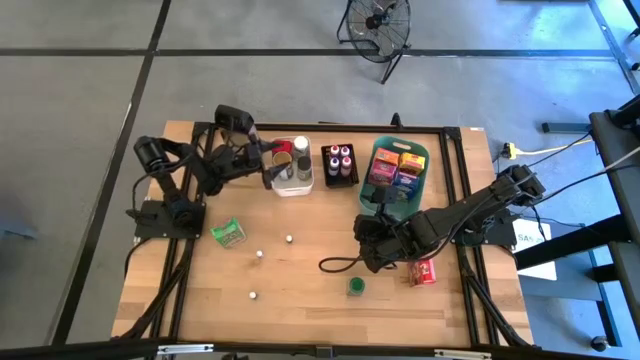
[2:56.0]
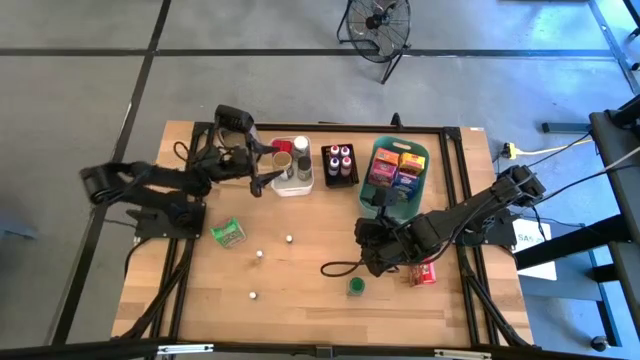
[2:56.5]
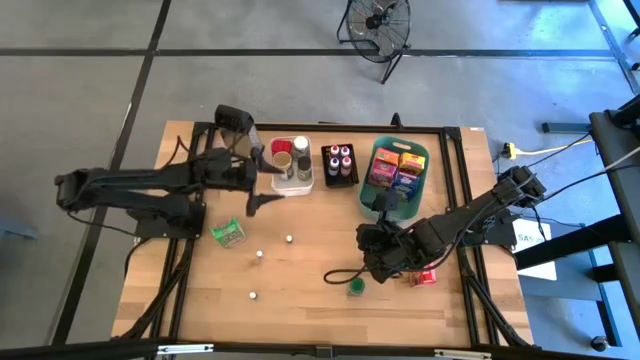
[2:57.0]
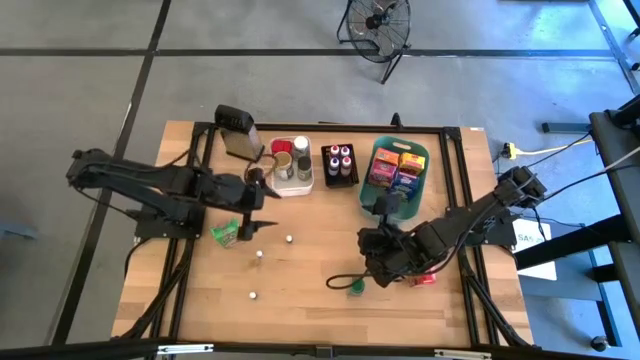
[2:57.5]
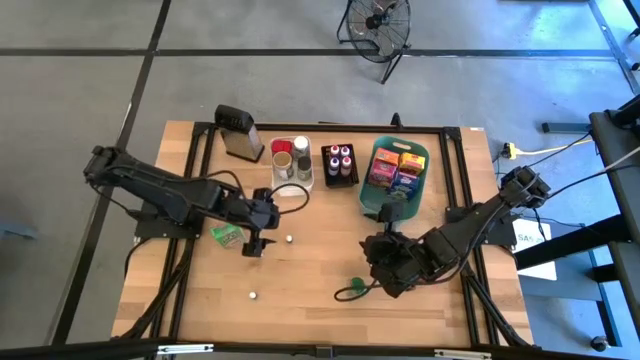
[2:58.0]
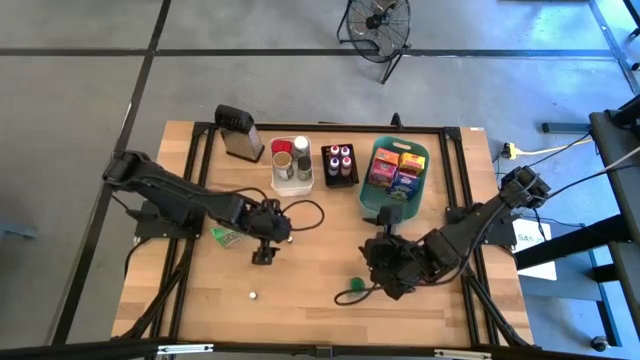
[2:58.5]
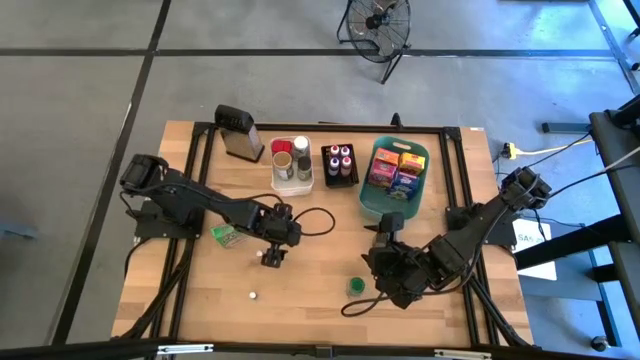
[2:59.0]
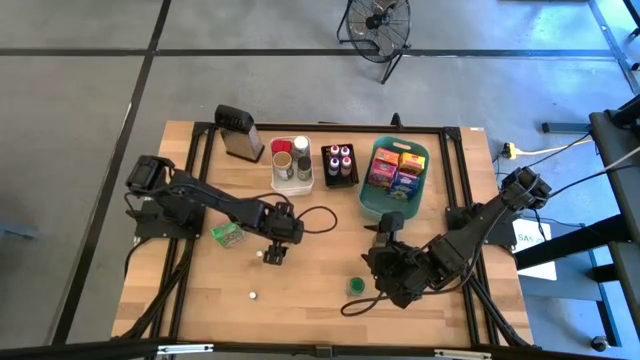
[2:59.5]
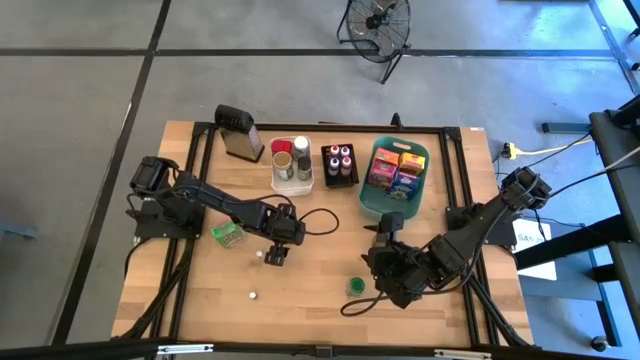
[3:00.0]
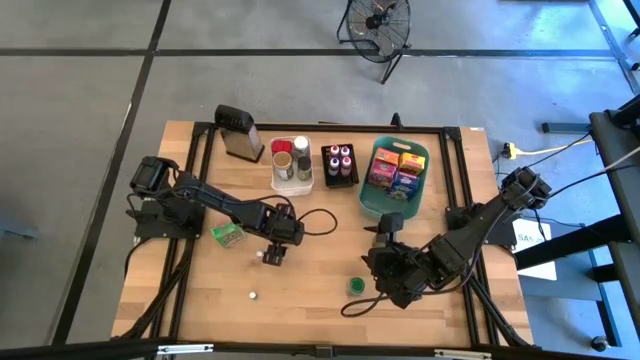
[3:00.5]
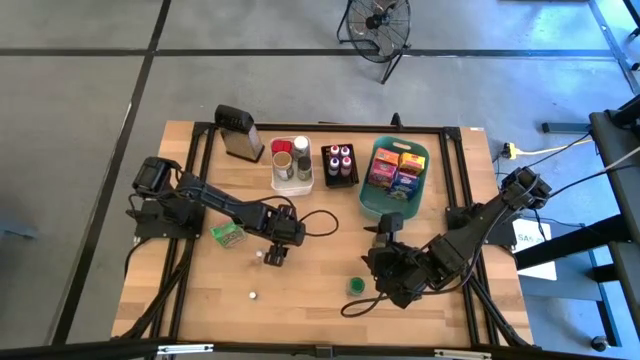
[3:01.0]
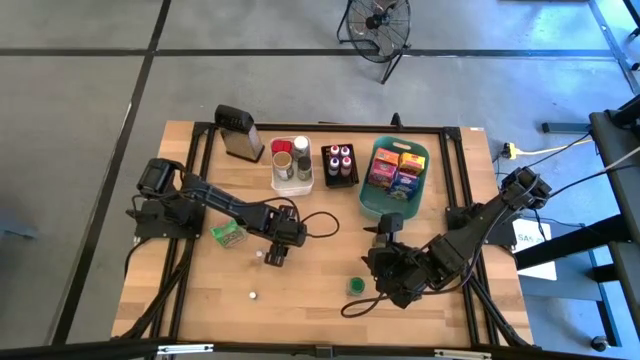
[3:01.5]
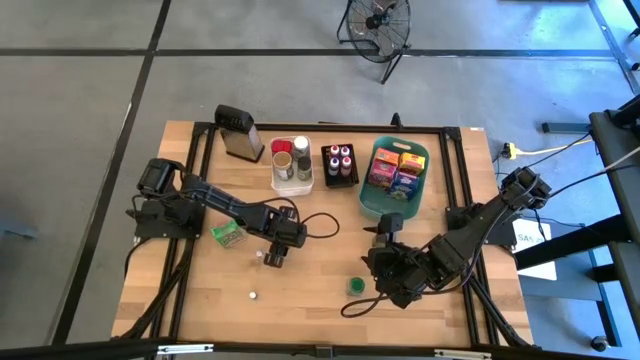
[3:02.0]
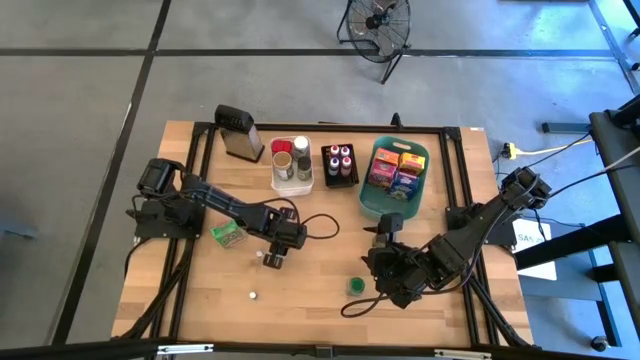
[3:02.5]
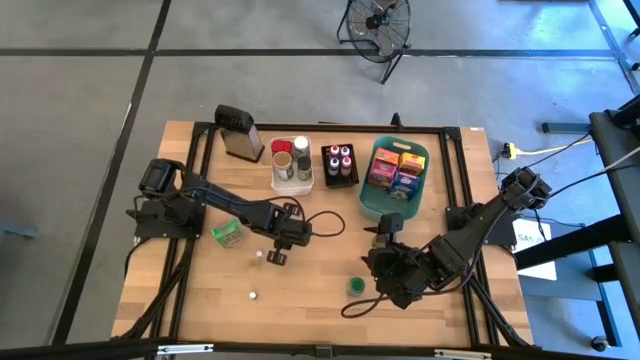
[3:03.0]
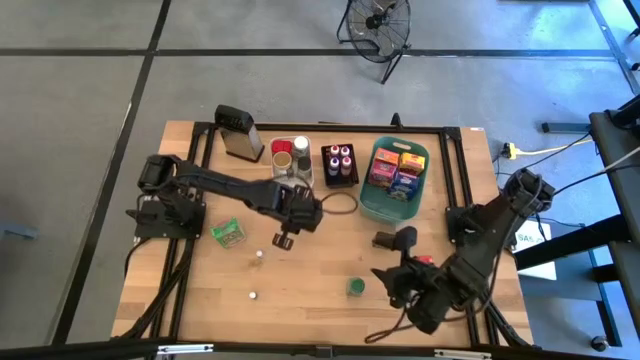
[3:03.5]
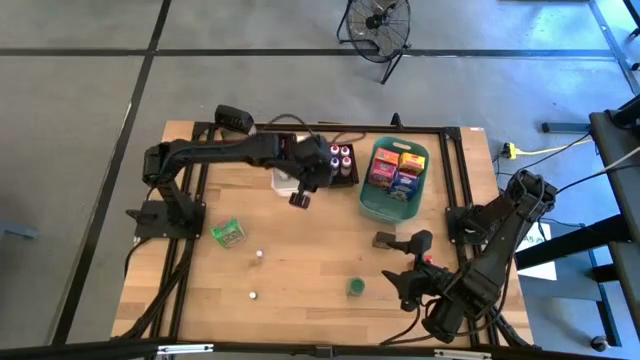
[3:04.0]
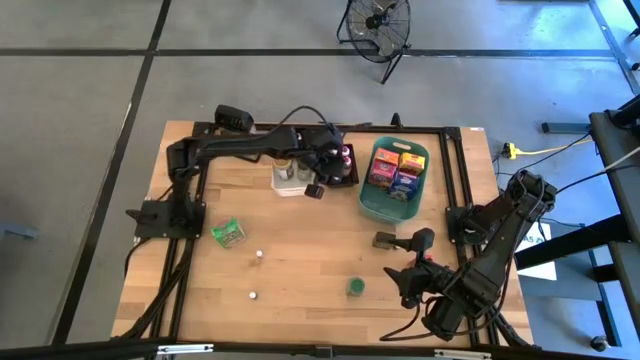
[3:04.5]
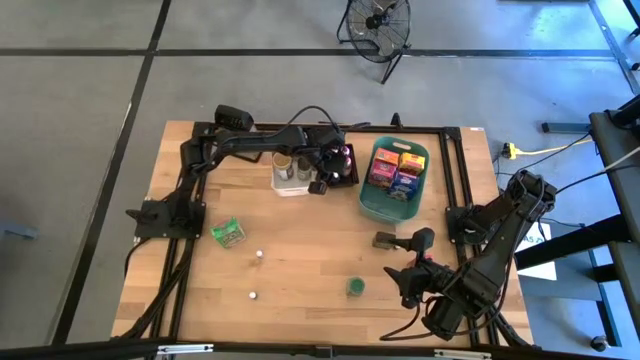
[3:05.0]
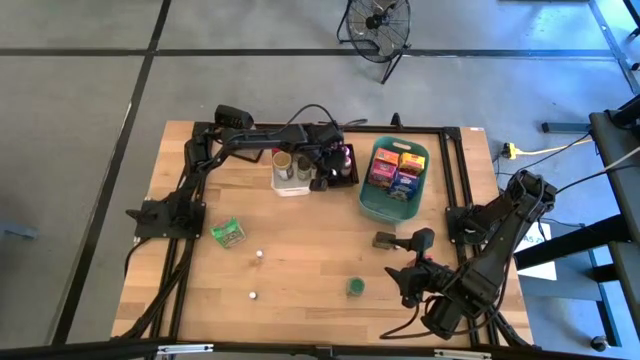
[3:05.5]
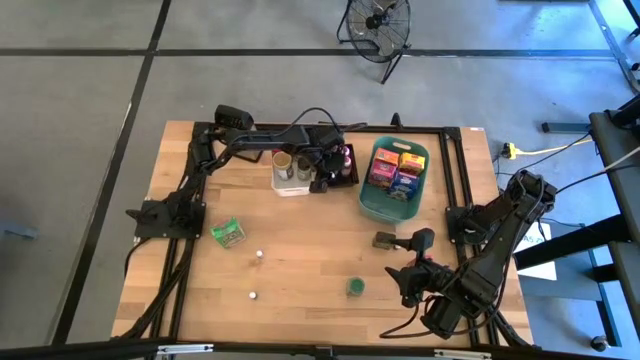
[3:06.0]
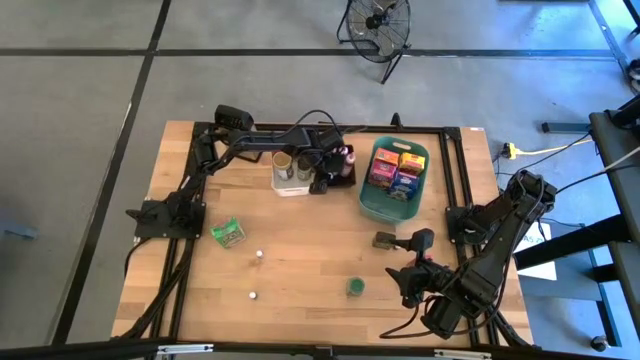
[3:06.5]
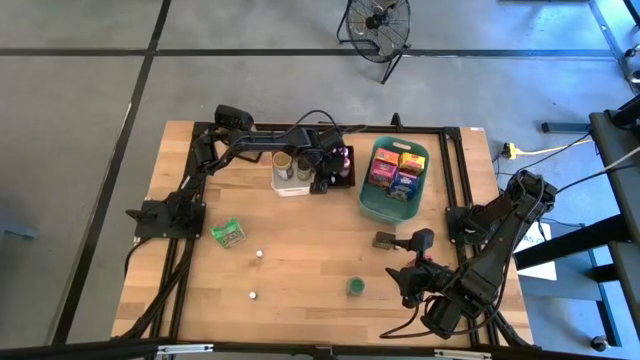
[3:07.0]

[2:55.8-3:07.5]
Task: Pick & Place Kitchen Items
Put the small green food coloring bottle into the black bin

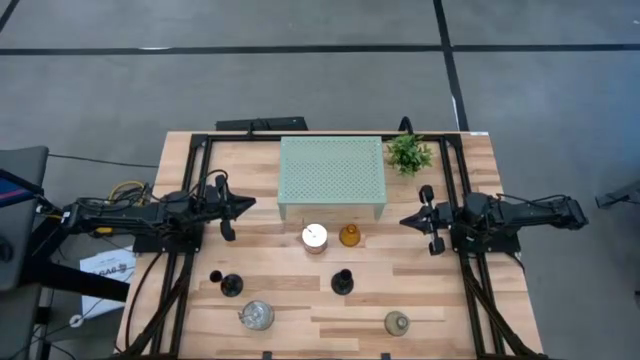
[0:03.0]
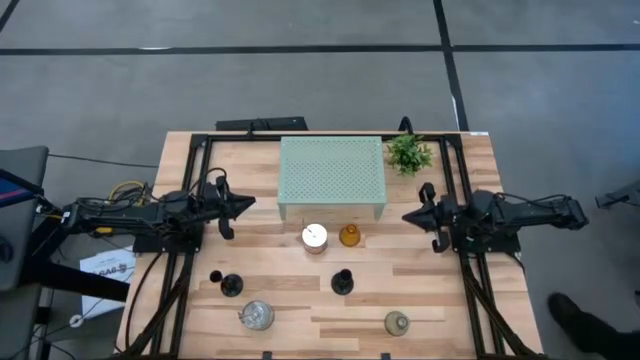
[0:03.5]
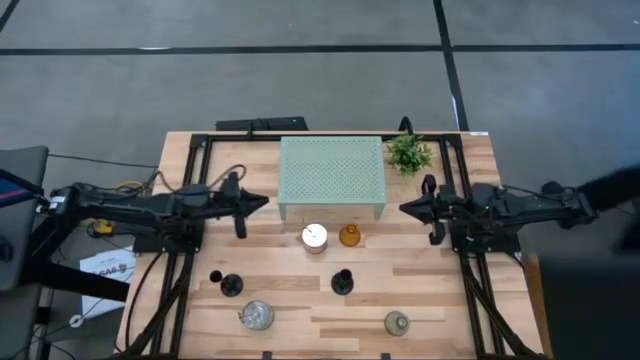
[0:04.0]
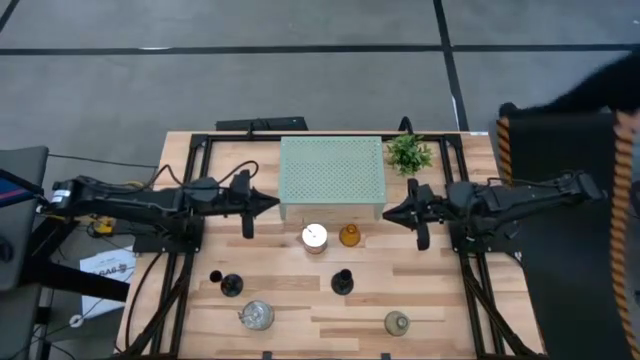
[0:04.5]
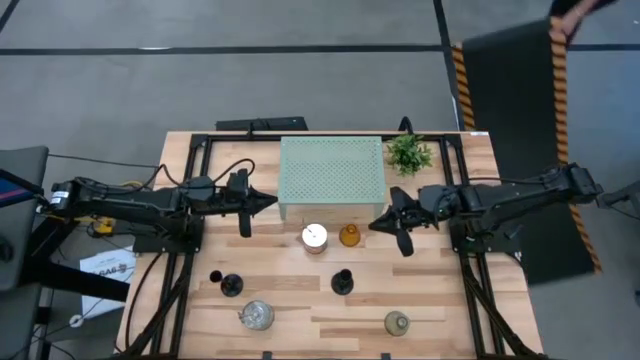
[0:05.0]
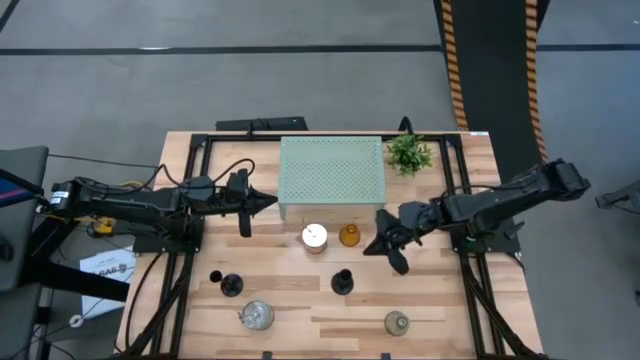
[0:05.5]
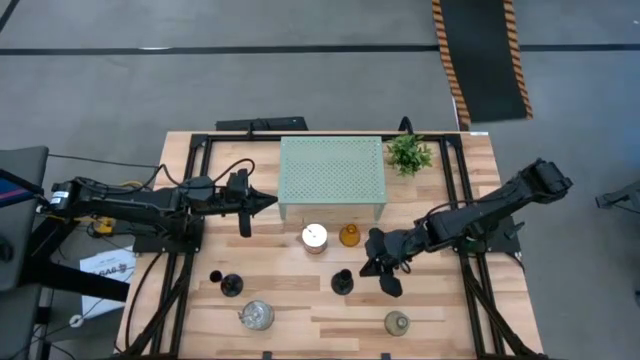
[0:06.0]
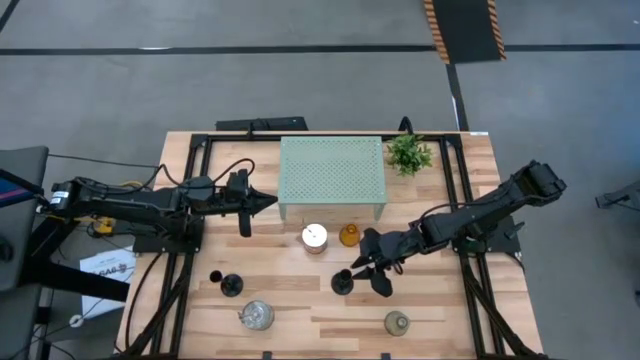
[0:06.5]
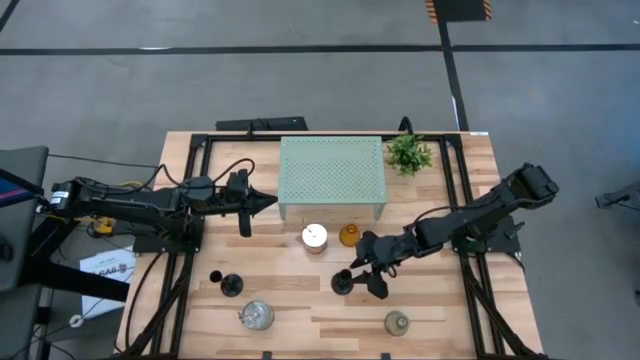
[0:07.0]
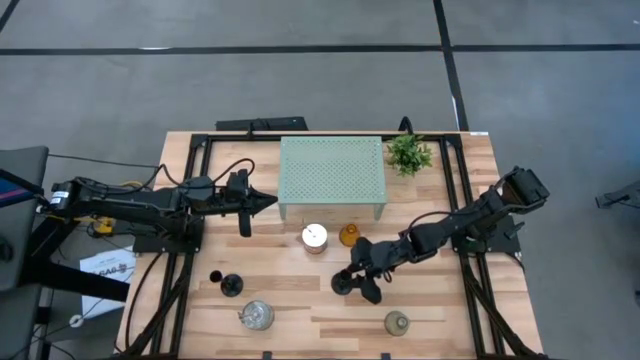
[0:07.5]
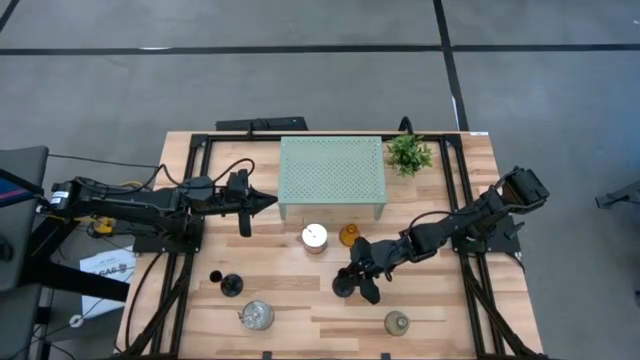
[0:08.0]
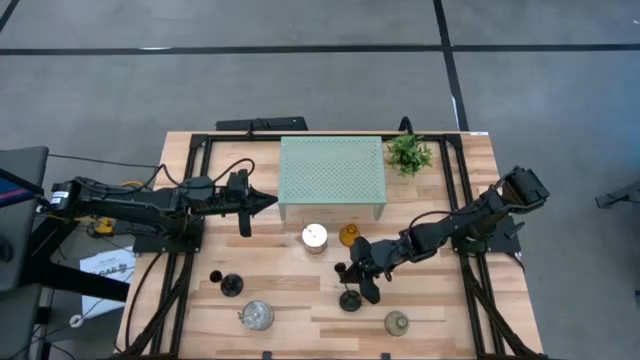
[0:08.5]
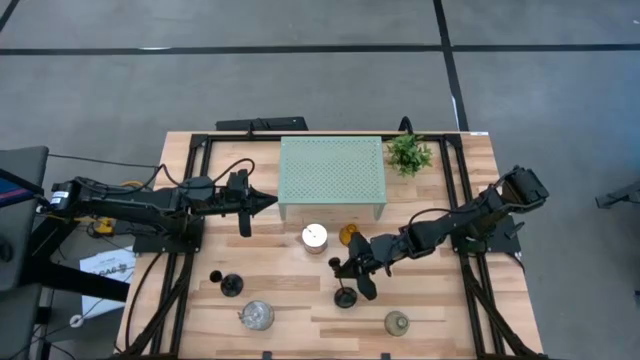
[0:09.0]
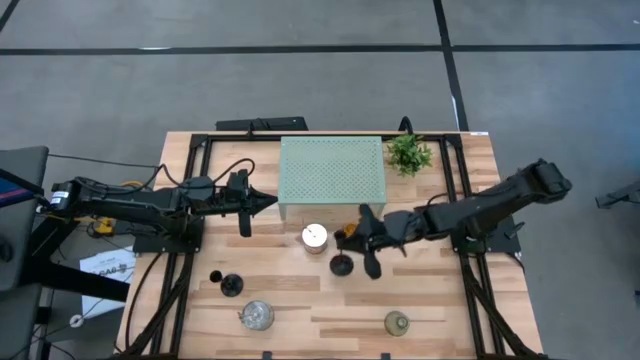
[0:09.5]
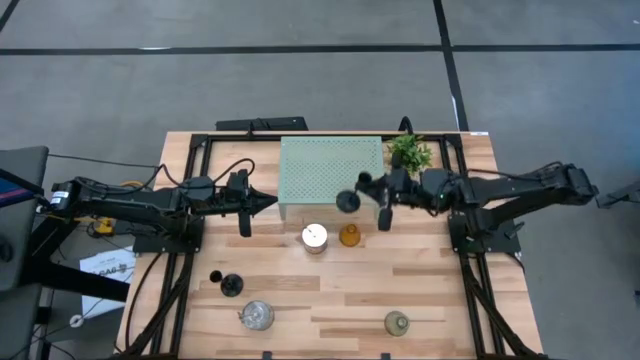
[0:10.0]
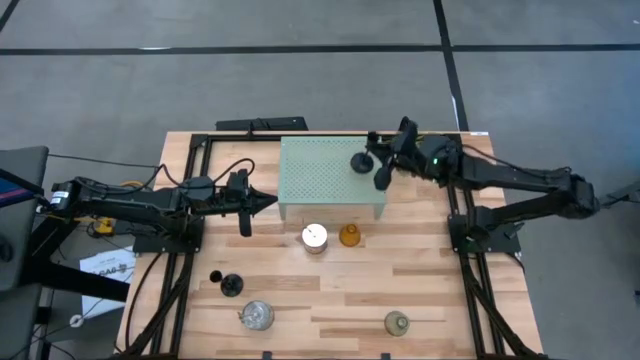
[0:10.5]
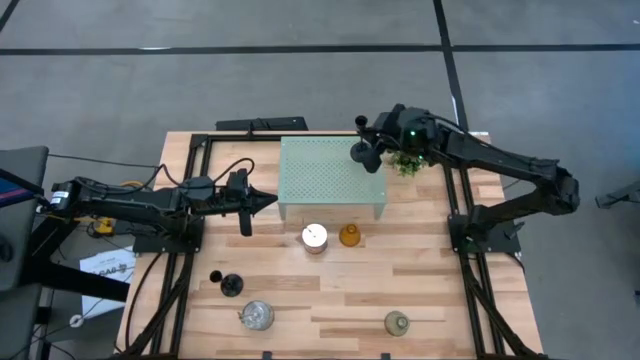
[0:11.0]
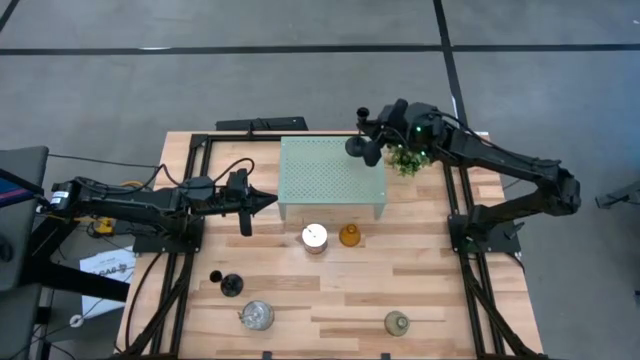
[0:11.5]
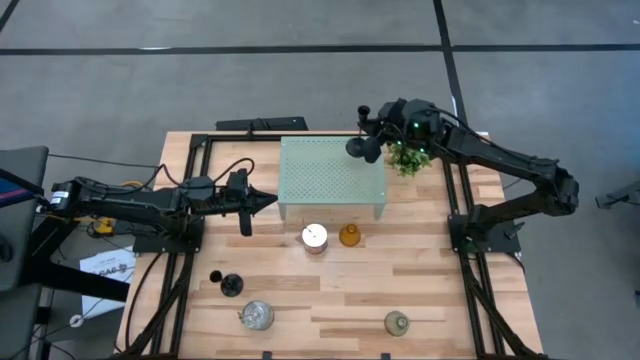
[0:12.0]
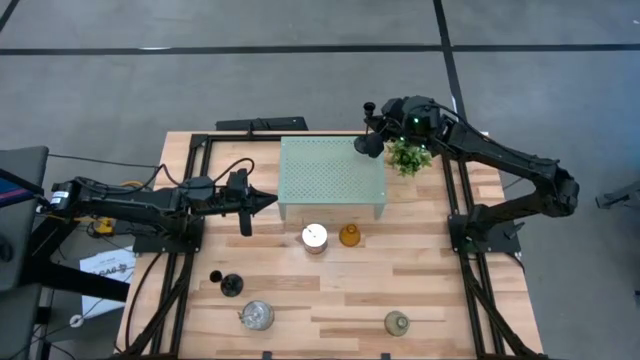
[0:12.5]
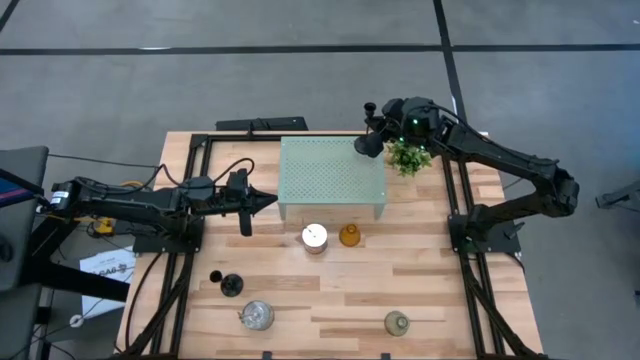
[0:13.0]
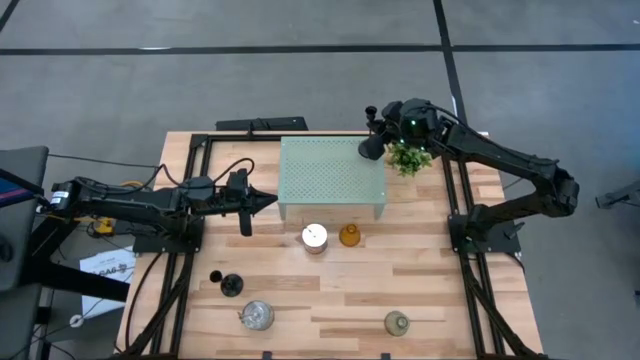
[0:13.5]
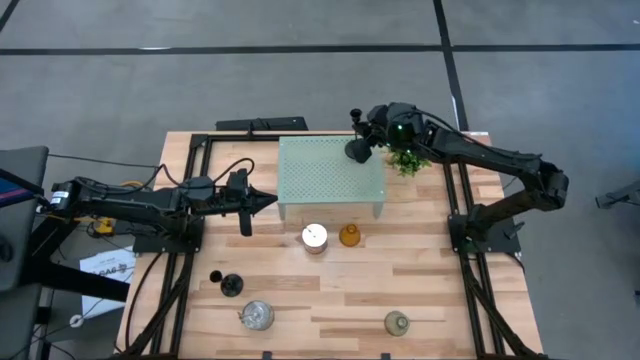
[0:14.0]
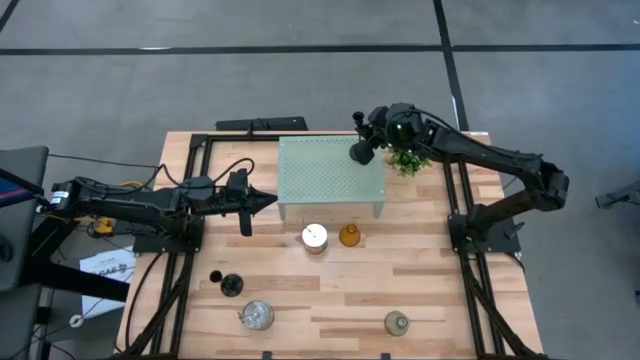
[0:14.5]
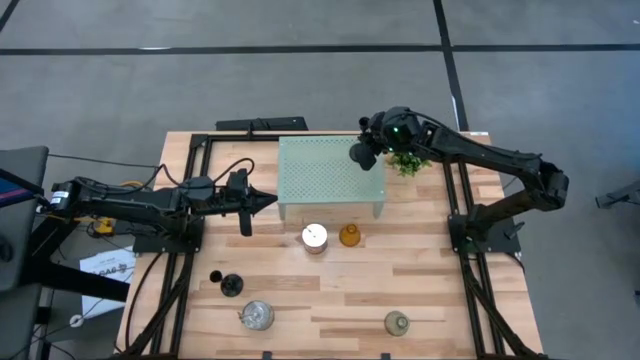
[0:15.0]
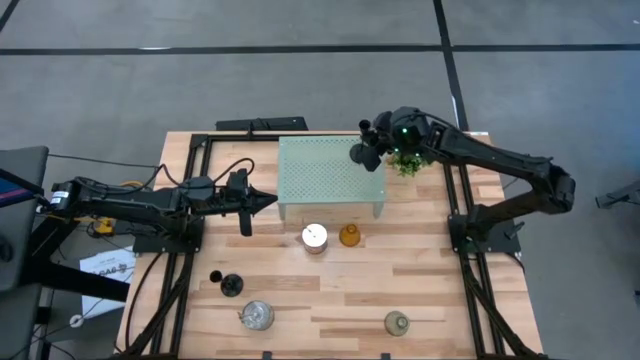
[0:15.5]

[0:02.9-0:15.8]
Task: Pick & Place candle stick holders
Put the black candle holder on the shelf
